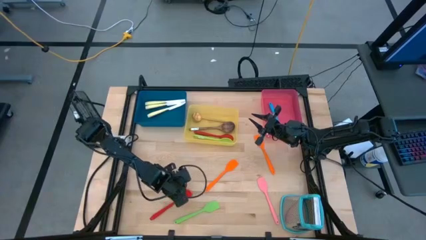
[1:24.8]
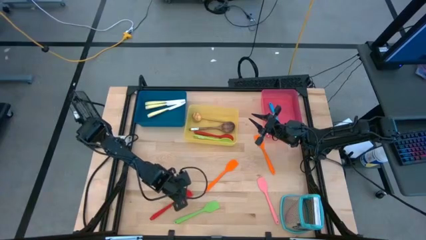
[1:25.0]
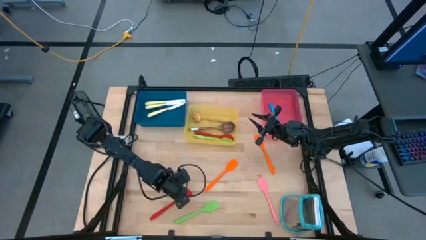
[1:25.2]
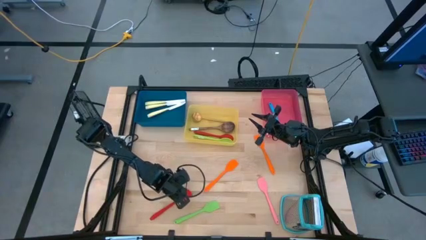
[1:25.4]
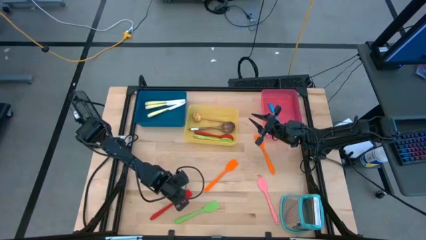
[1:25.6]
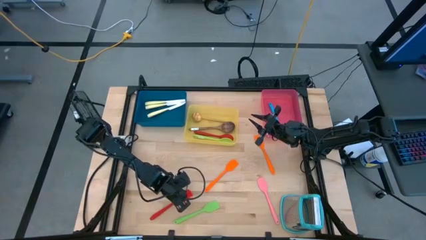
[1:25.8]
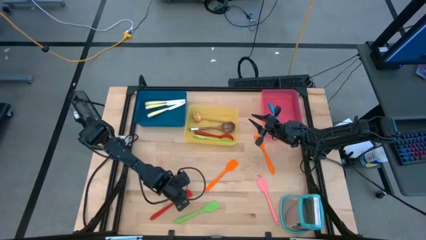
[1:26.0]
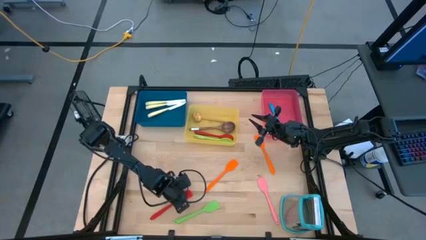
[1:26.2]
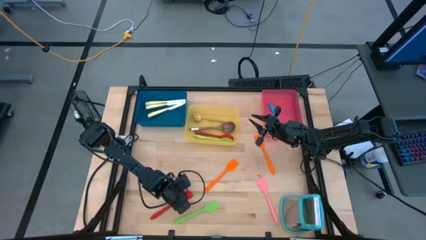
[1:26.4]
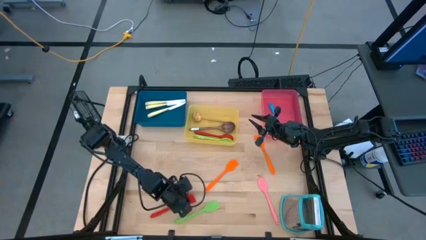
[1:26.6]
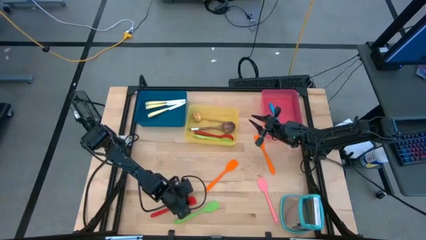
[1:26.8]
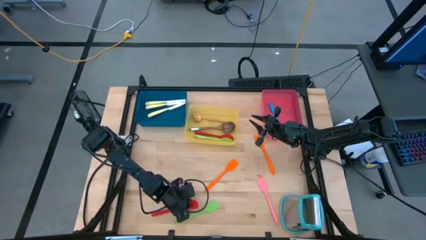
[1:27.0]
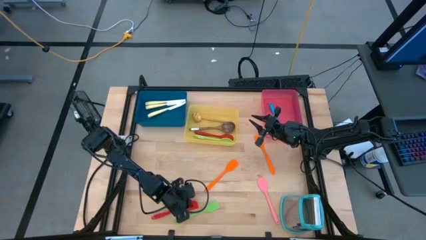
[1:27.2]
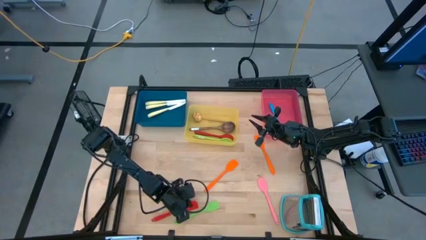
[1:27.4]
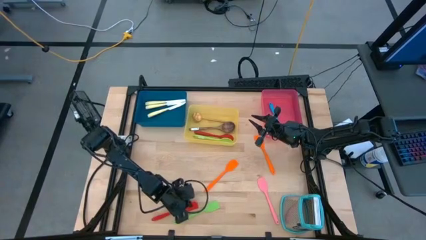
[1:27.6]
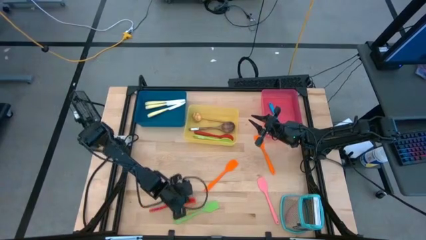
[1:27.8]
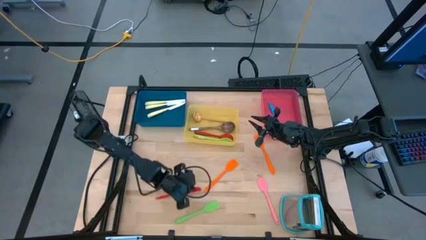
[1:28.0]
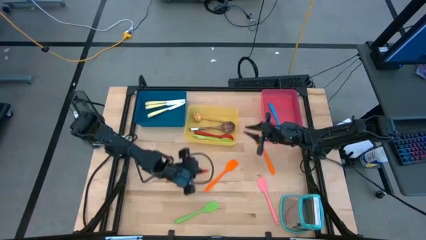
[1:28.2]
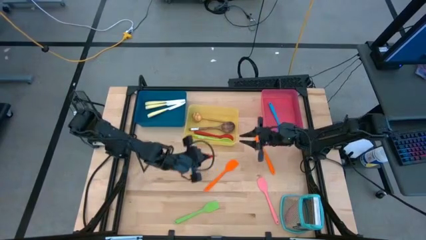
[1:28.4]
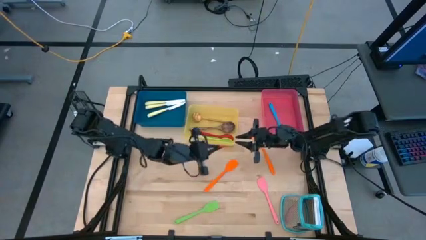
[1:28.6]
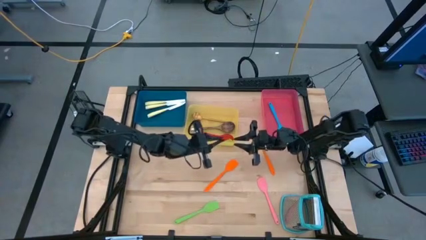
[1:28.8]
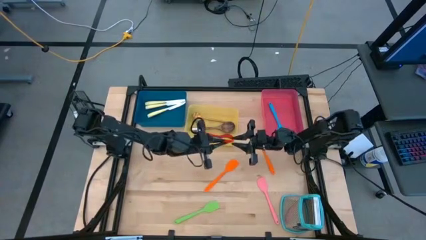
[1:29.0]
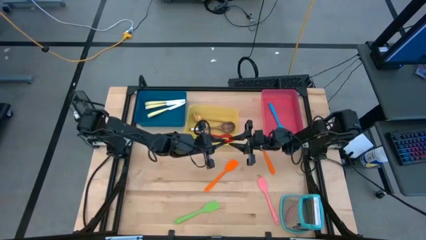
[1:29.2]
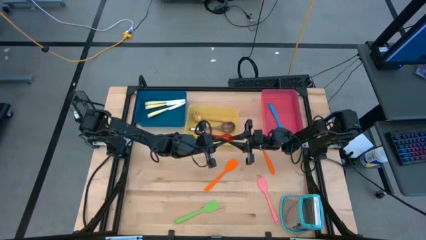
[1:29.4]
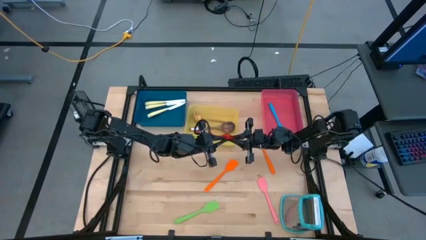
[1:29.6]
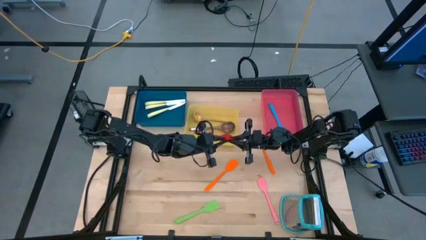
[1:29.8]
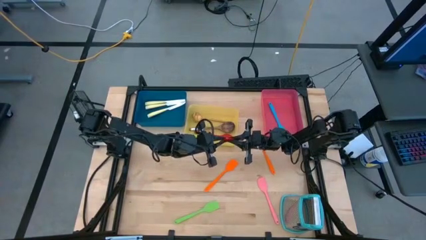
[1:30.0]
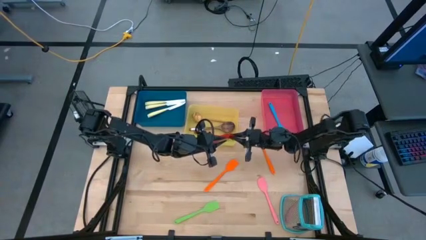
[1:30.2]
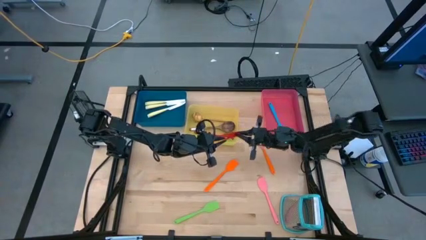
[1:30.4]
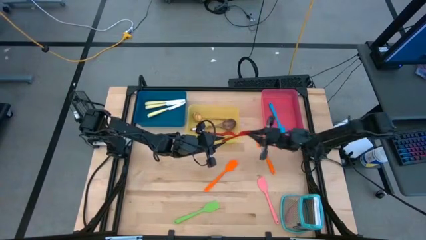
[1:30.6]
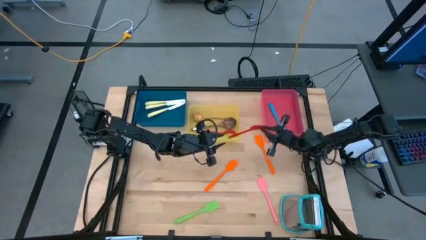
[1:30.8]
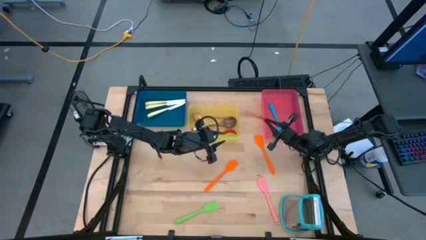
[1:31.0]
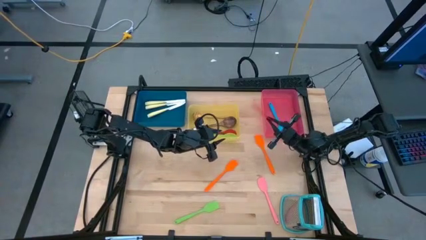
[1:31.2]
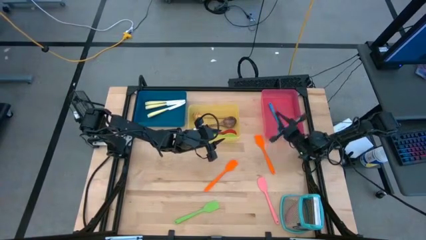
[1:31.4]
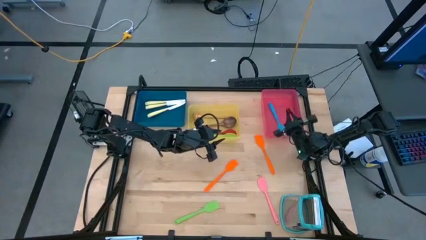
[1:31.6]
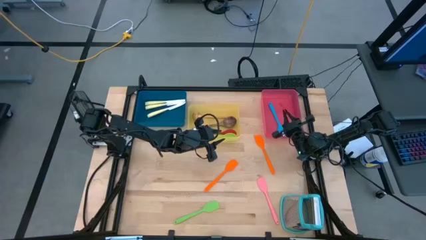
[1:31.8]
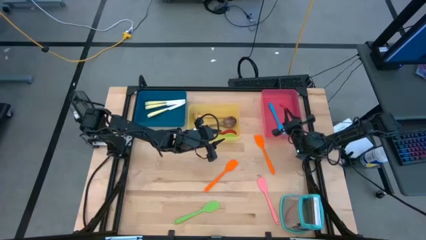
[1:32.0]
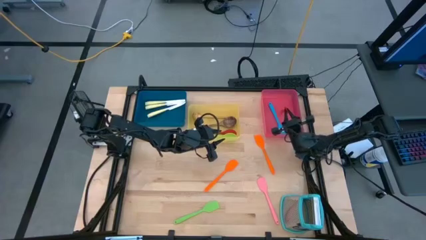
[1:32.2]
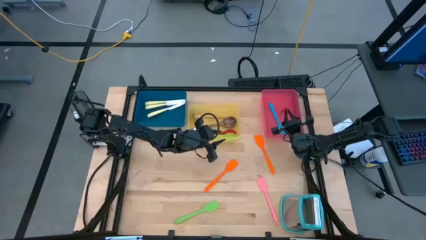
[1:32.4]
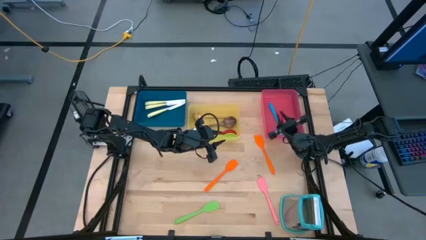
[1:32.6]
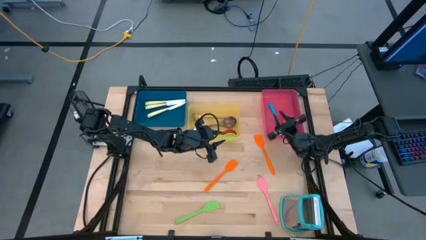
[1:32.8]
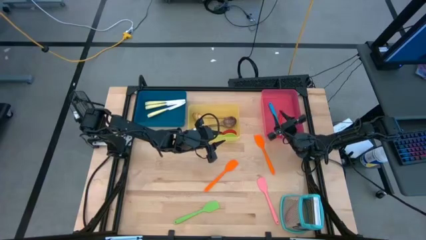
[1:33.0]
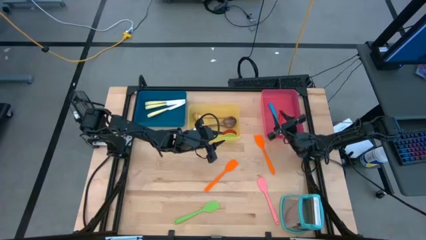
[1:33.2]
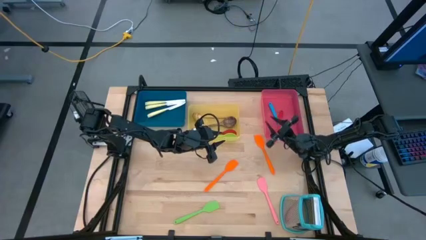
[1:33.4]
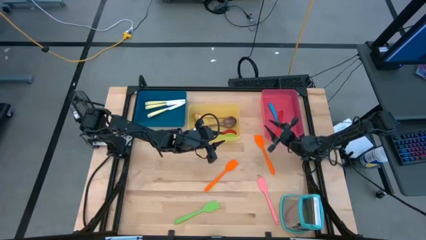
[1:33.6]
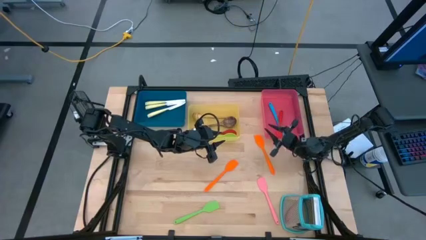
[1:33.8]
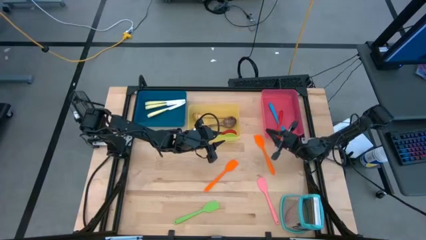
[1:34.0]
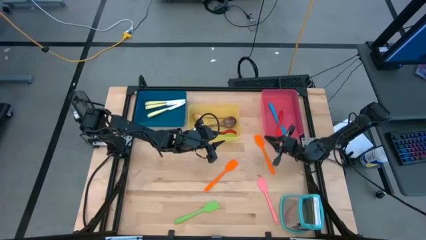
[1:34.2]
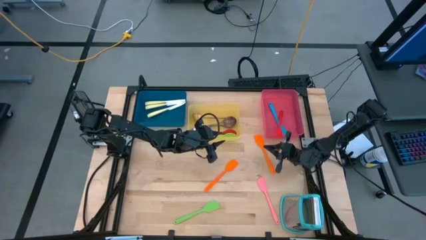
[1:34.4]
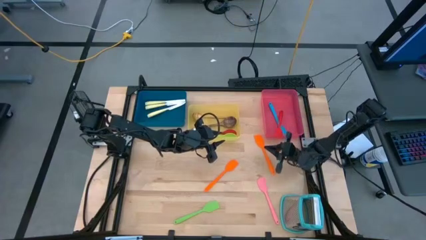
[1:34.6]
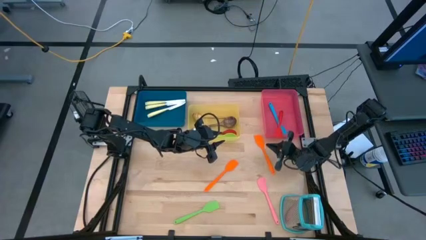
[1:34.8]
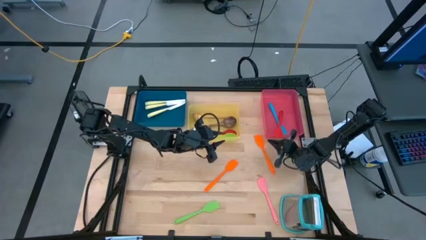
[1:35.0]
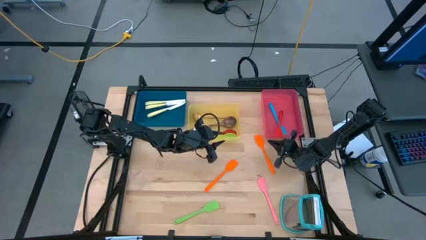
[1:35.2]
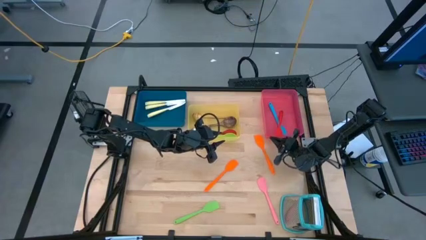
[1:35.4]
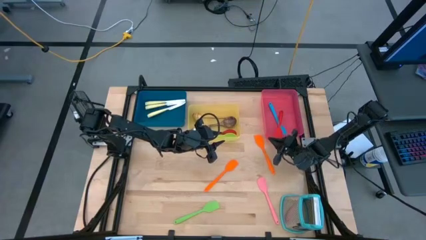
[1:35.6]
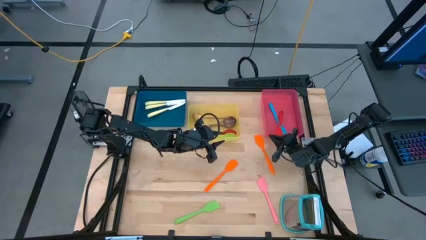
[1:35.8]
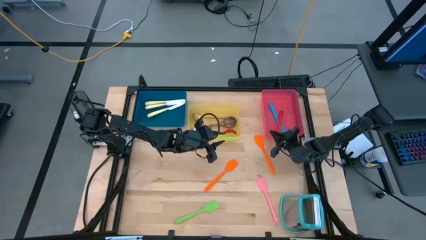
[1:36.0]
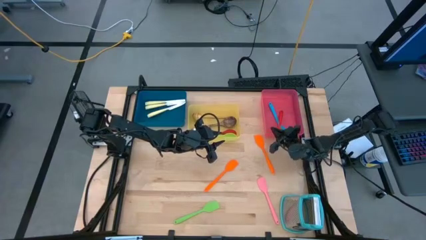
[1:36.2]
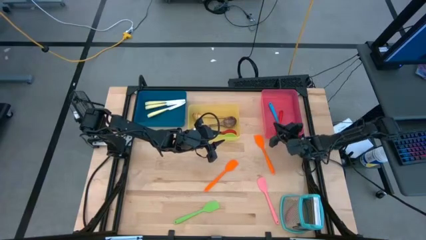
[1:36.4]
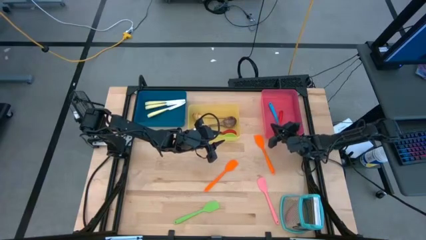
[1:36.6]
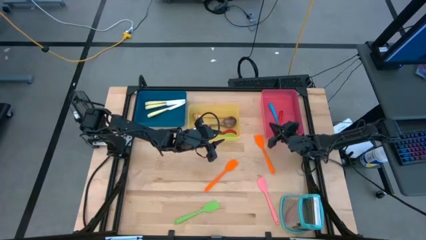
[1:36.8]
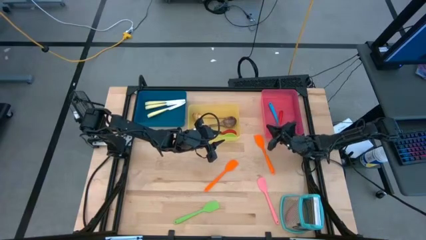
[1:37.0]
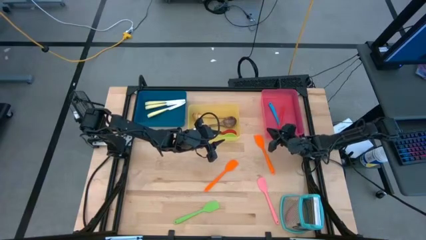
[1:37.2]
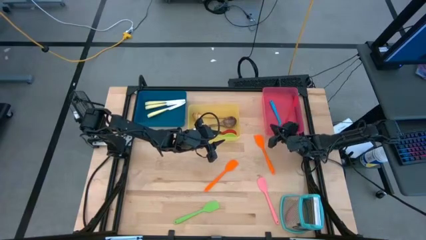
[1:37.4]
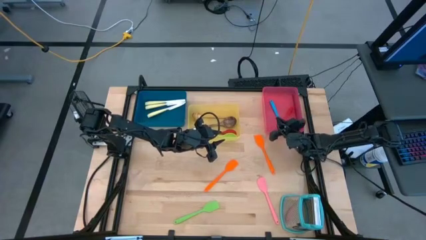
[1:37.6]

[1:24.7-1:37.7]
Task: Pick & Place Kitchen Items
Put the red spatula into the red bin

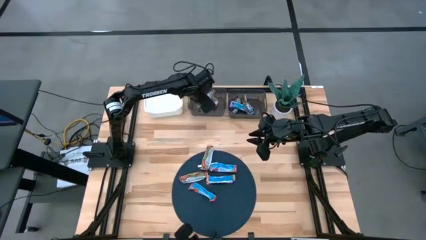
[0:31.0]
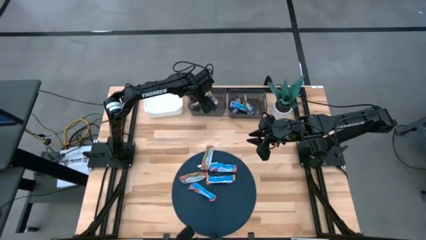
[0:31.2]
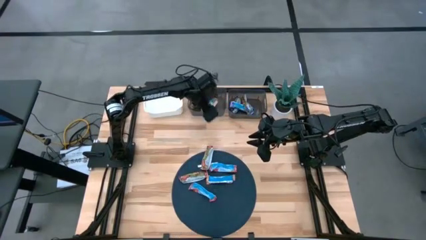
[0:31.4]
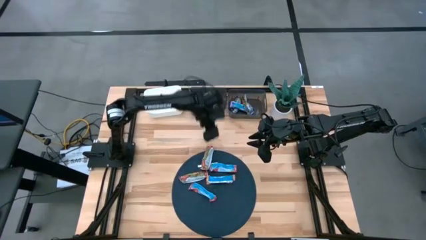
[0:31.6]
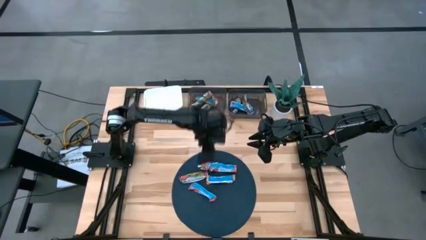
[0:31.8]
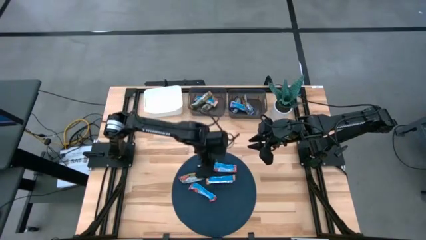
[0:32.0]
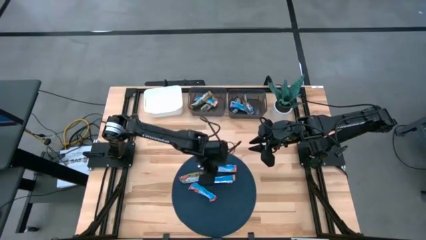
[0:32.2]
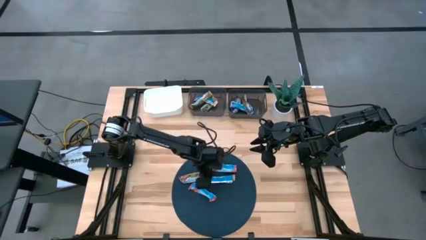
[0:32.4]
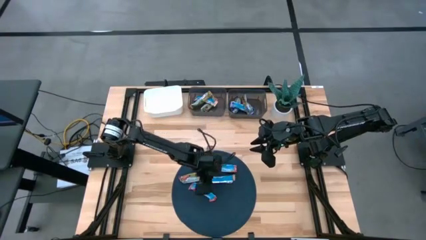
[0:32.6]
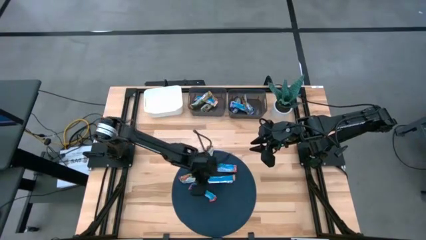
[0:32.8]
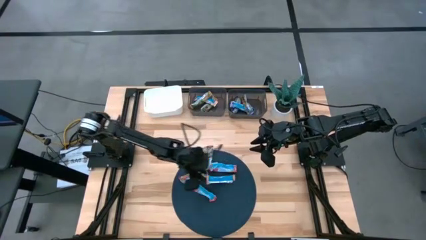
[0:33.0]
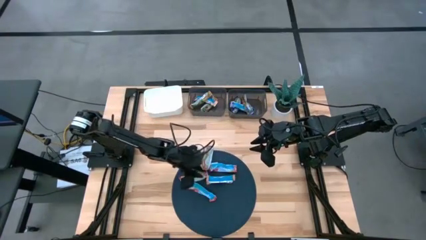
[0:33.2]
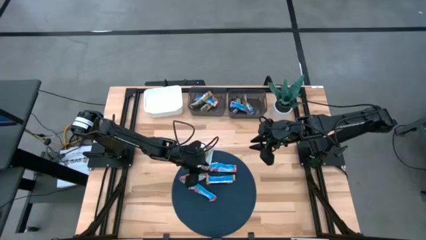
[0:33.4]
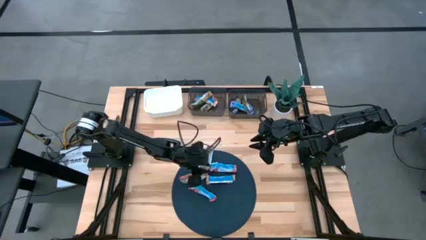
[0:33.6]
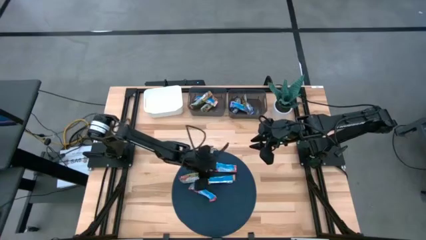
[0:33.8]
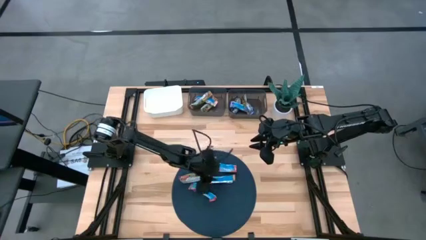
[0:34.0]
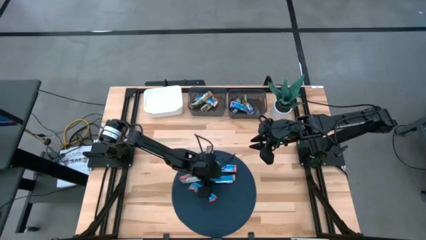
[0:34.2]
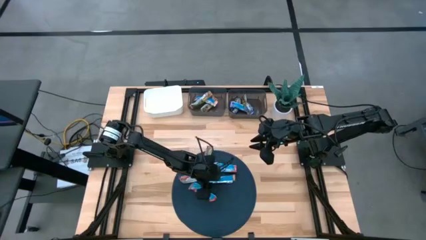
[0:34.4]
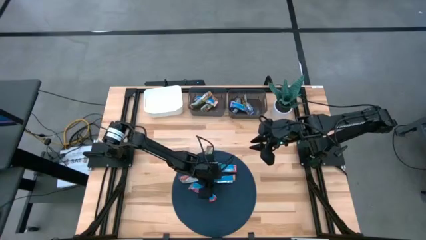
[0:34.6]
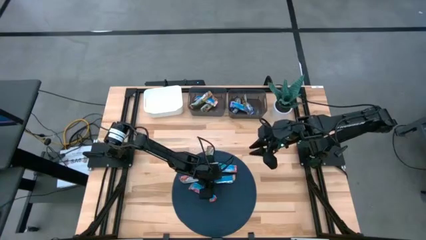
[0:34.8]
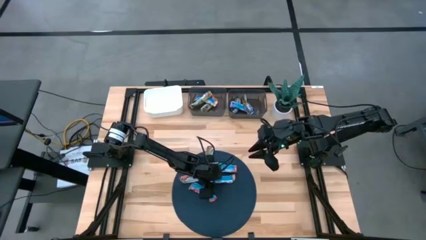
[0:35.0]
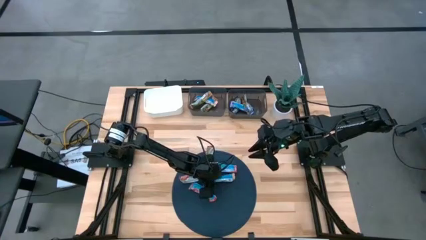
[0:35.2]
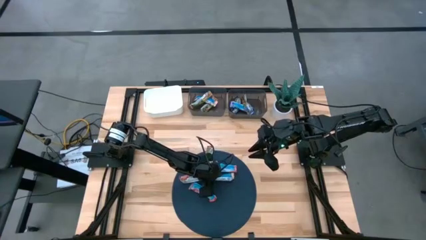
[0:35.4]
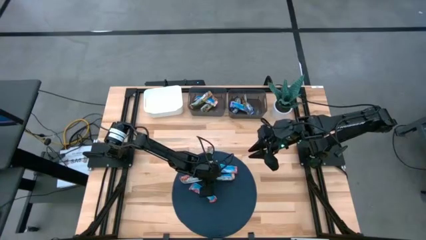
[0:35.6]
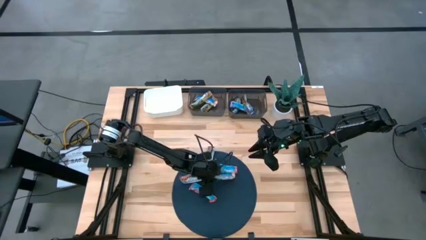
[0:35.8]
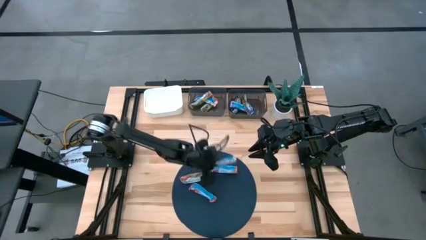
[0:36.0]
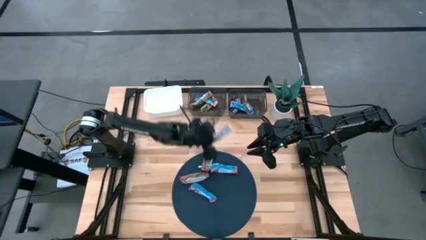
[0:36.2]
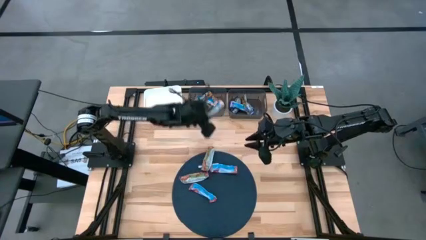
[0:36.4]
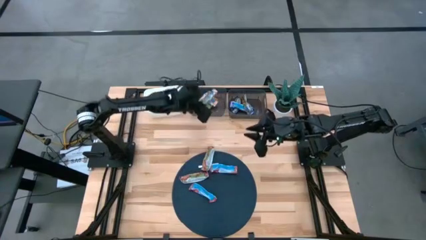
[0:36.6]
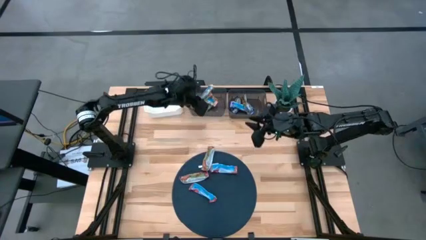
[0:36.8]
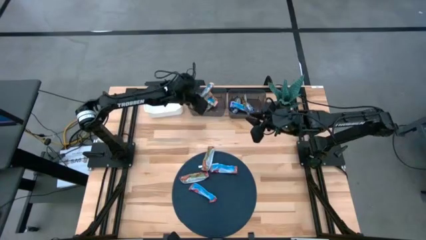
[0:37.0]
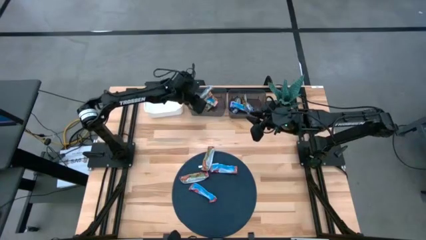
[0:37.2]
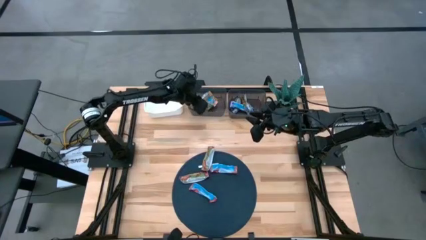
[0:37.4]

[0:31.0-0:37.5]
Task: Pick and place Granola Bars by type
Put the orange granola bar into the left black transparent bin
